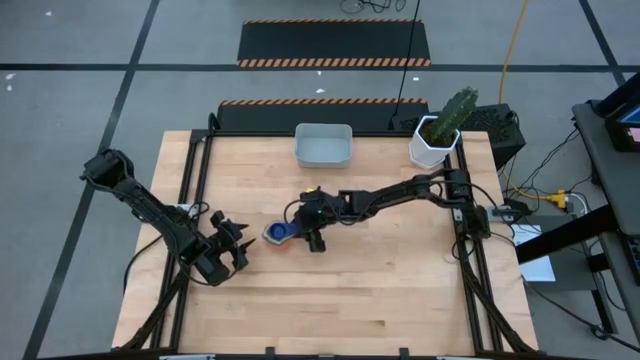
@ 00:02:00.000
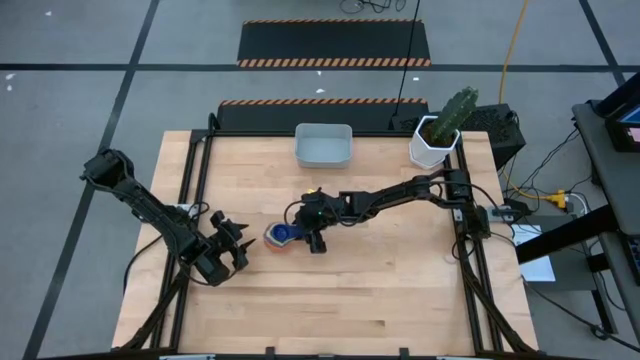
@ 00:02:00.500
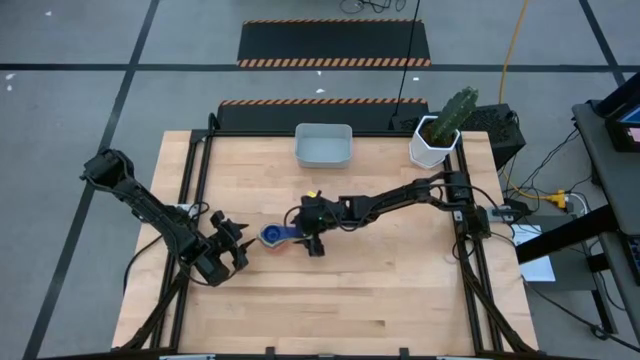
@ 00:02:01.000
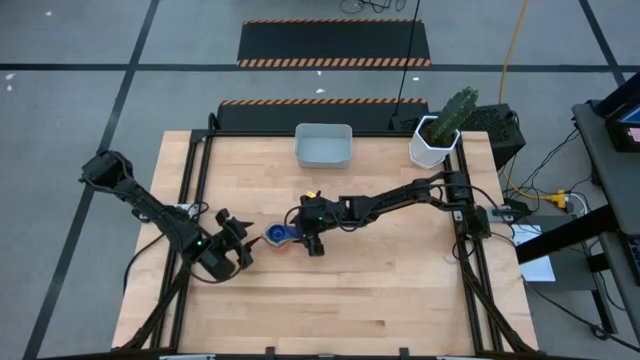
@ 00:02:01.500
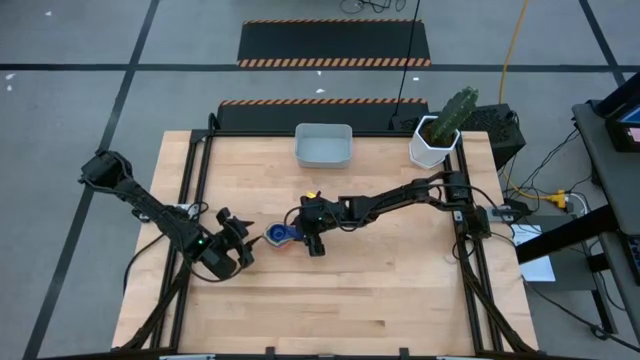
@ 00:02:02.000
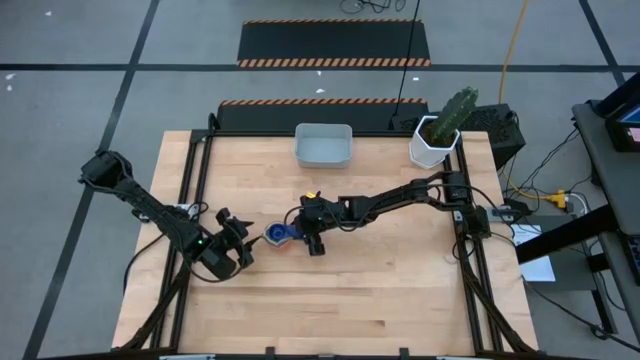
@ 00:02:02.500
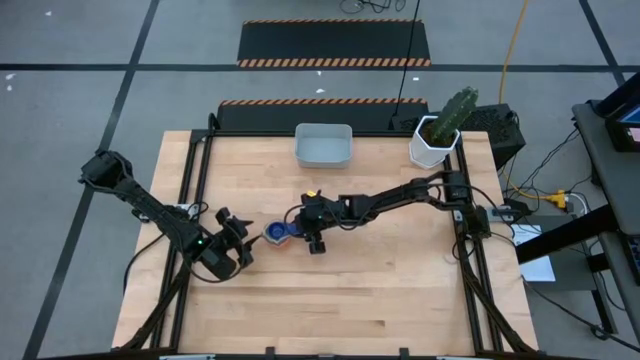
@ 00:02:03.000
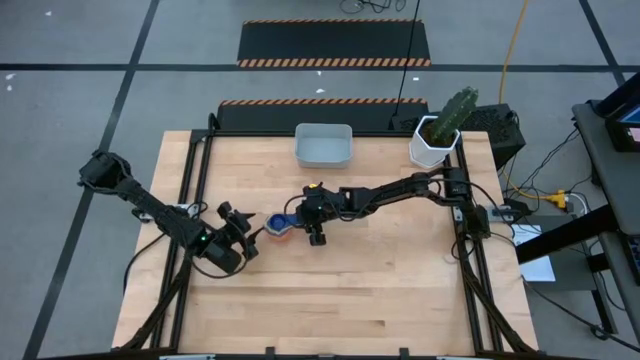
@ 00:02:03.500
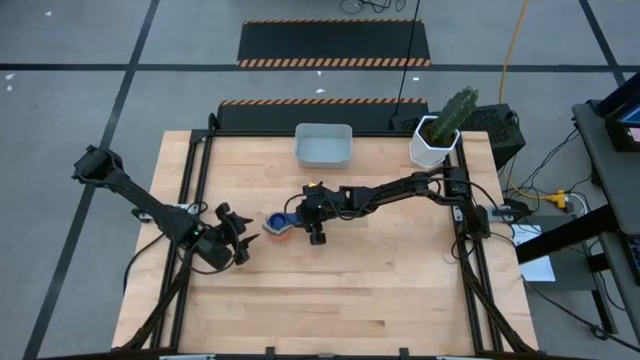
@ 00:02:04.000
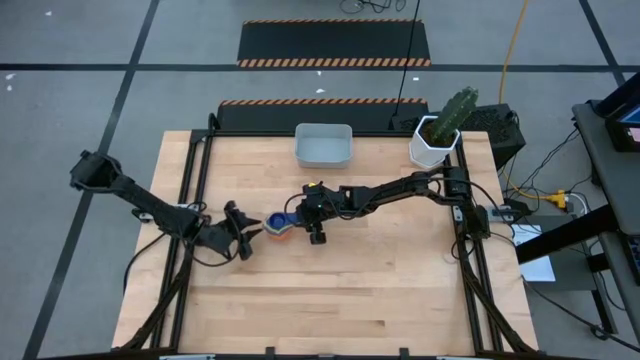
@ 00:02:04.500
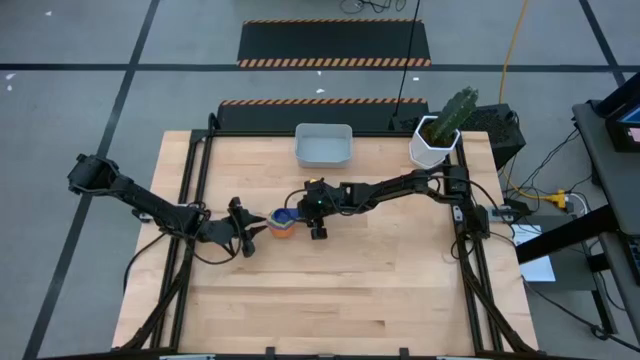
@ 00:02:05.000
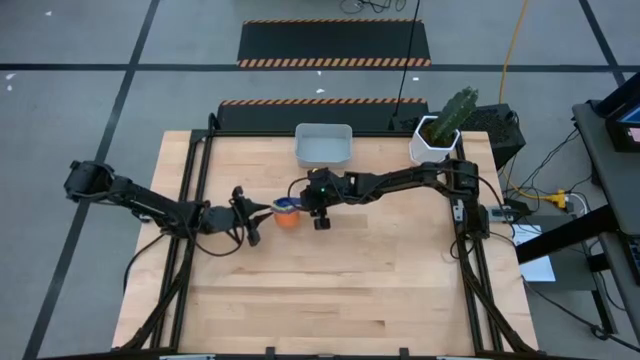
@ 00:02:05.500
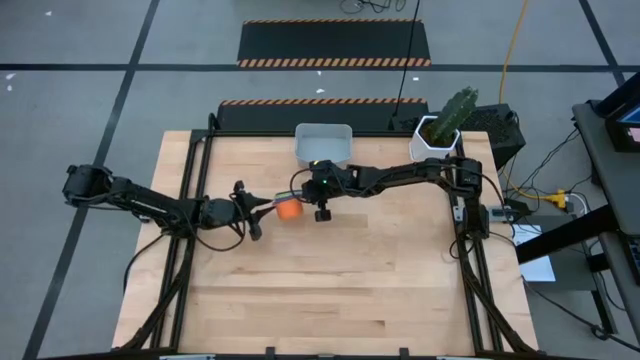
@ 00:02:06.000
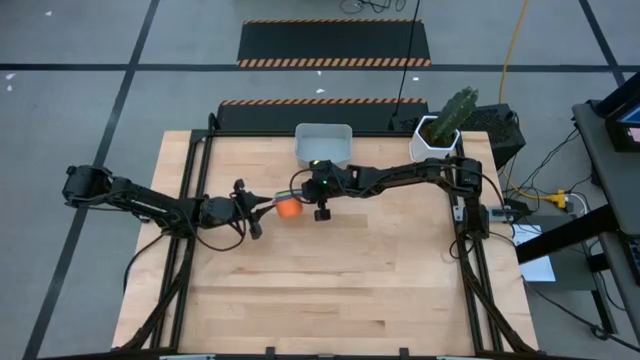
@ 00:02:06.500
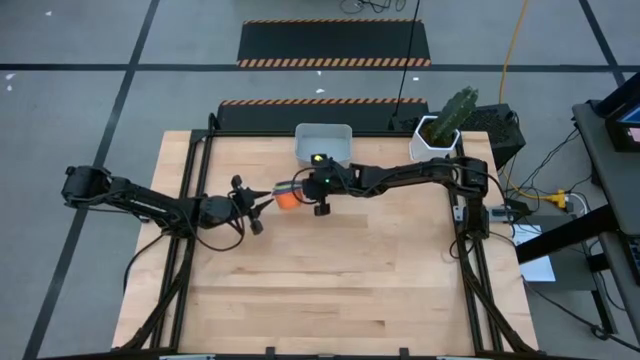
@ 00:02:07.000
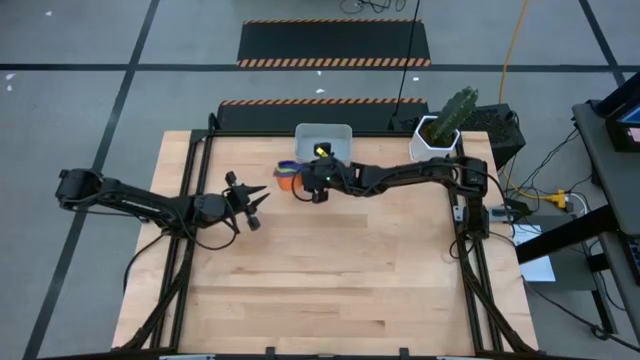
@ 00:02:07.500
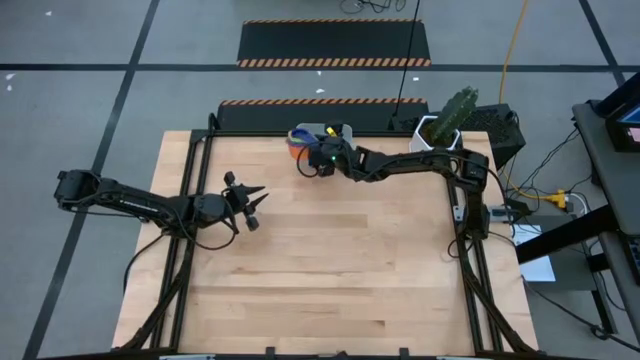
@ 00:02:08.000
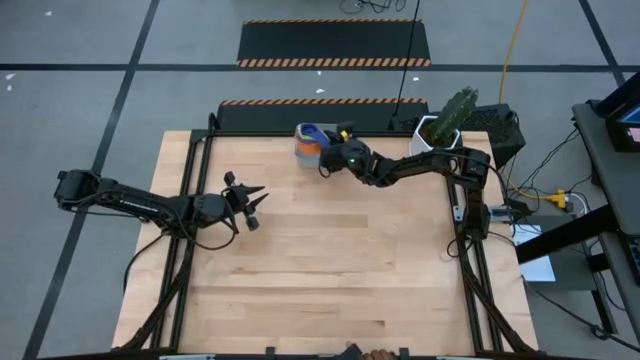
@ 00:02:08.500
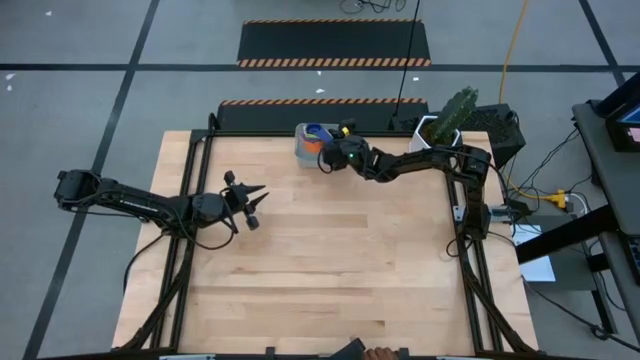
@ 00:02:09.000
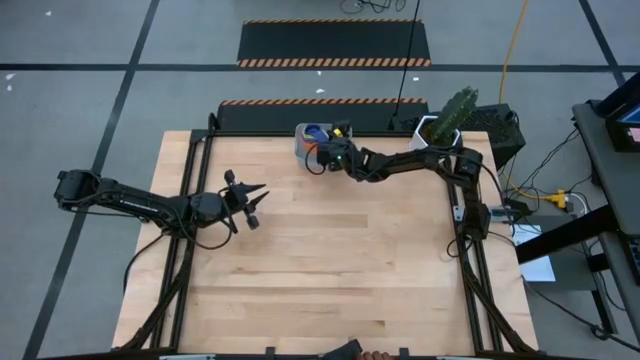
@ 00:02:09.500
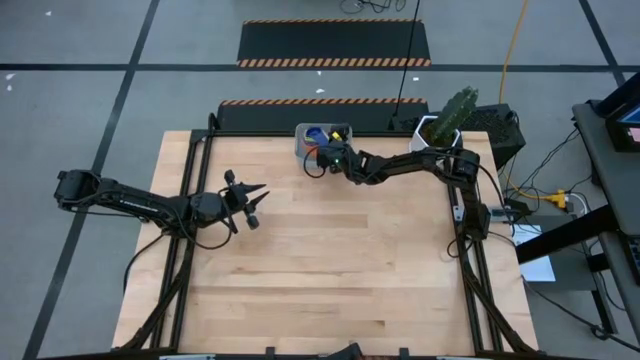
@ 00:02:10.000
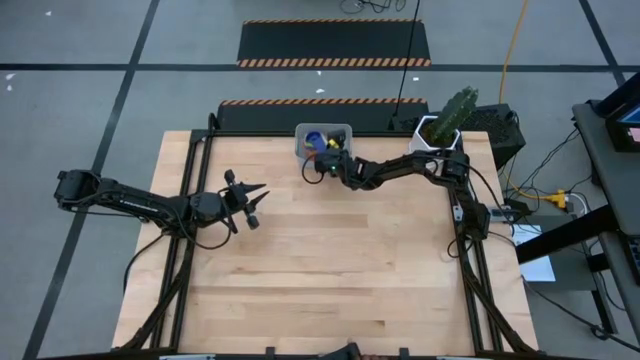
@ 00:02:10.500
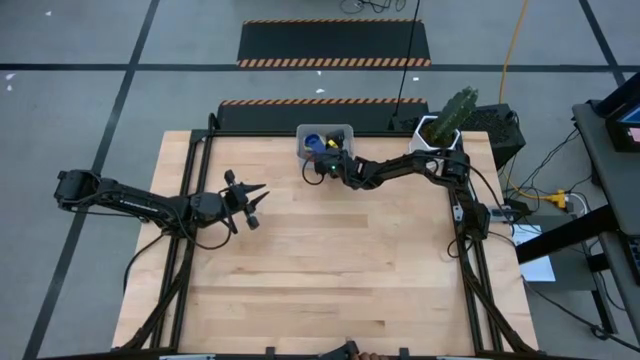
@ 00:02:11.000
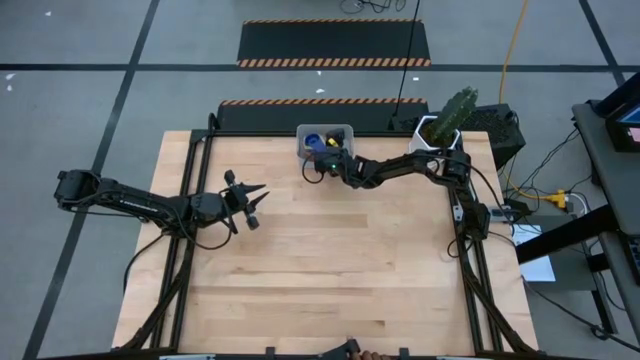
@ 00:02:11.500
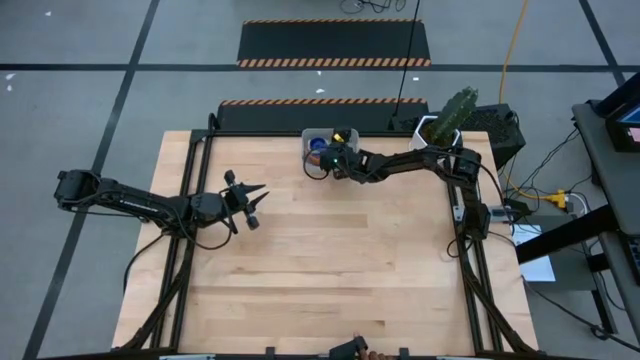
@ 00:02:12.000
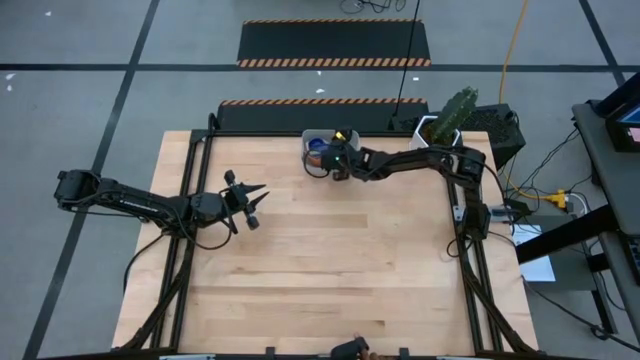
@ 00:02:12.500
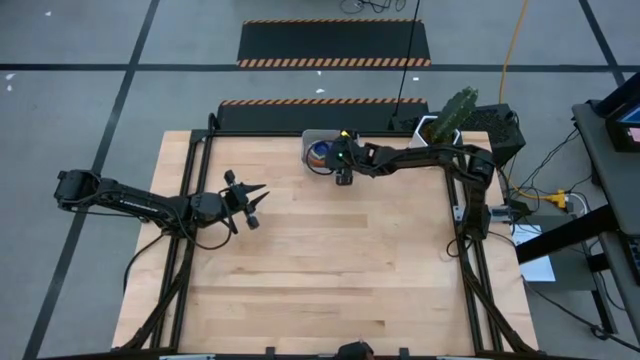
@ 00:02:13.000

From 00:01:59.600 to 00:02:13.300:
Task: Nest measuring cups in basket
Put the nested measuring cups into the gray bin

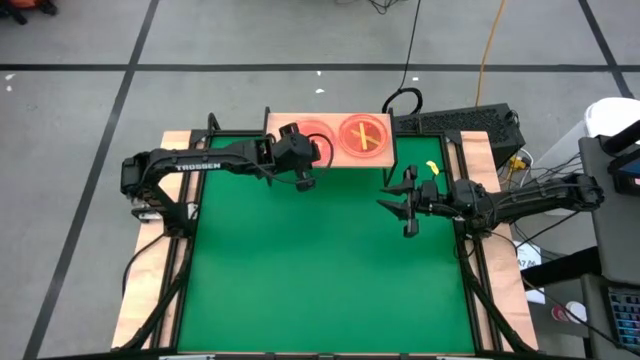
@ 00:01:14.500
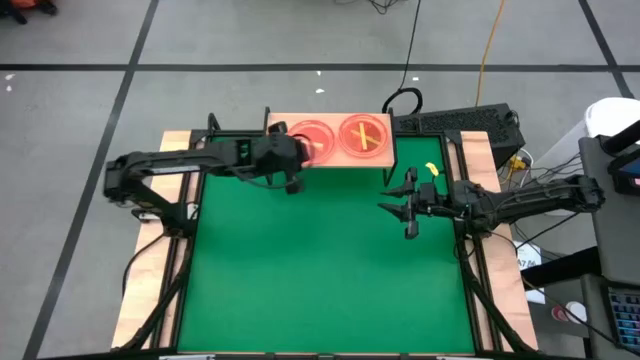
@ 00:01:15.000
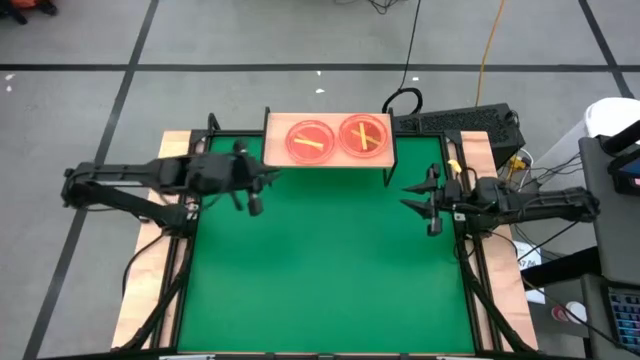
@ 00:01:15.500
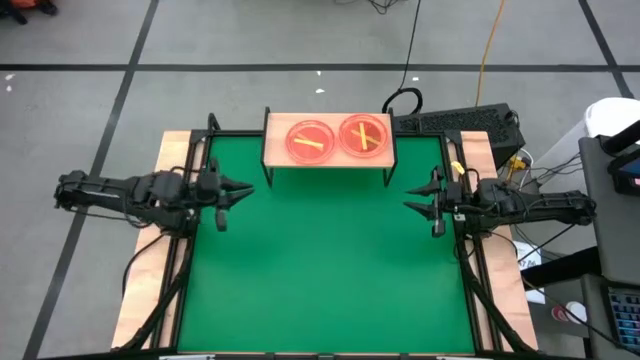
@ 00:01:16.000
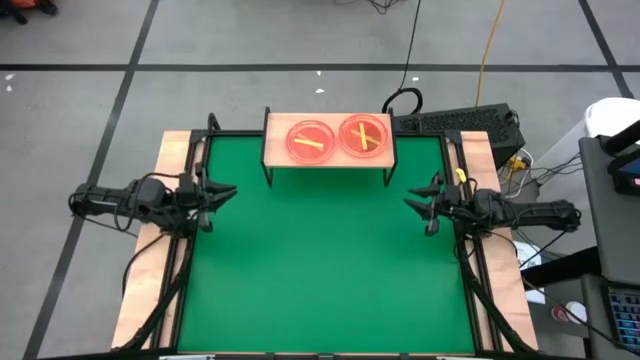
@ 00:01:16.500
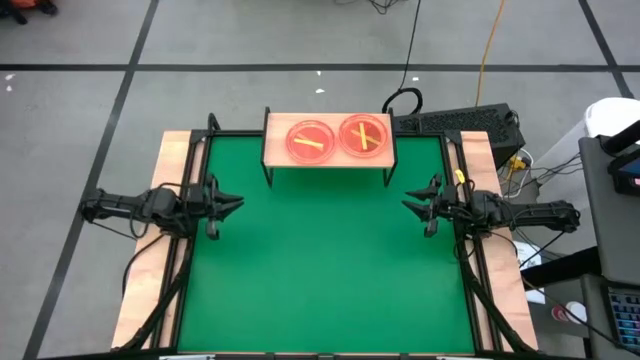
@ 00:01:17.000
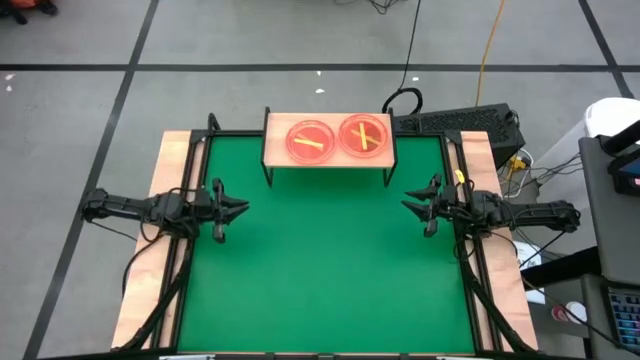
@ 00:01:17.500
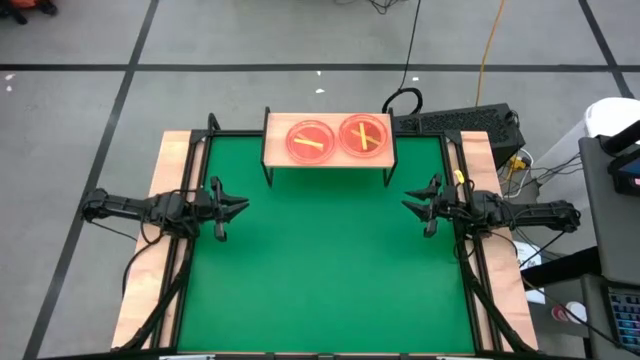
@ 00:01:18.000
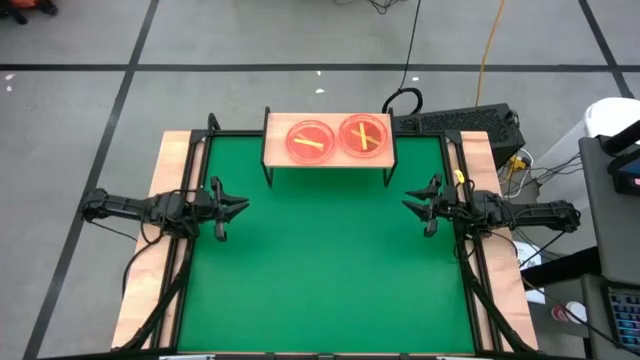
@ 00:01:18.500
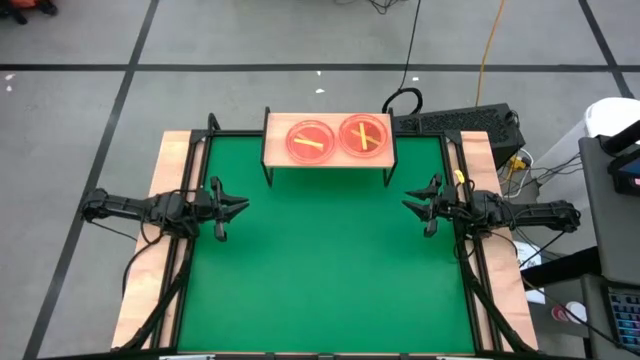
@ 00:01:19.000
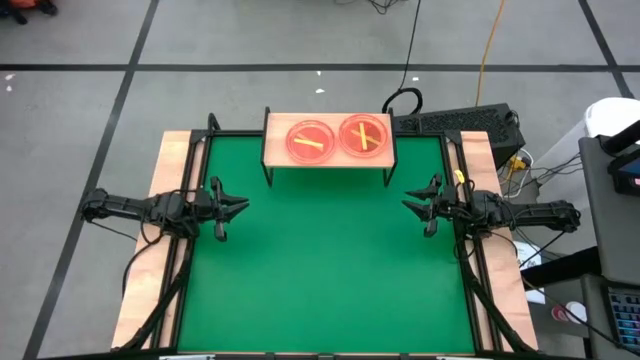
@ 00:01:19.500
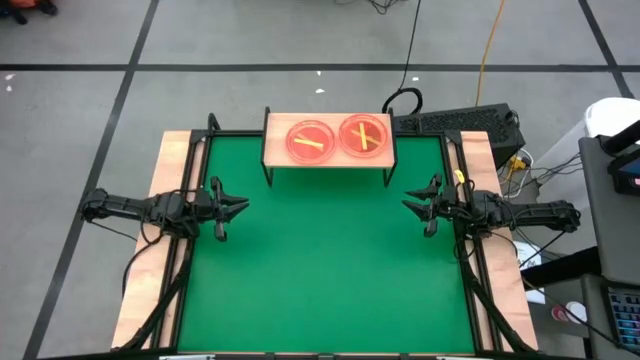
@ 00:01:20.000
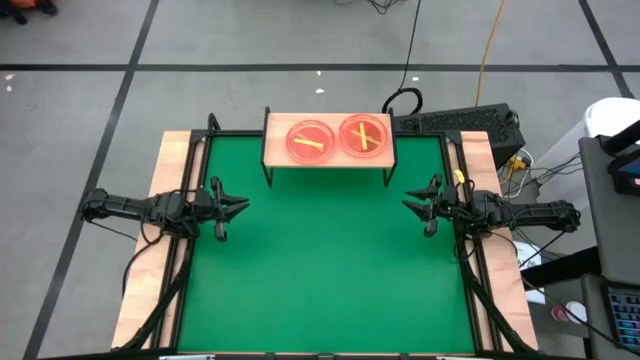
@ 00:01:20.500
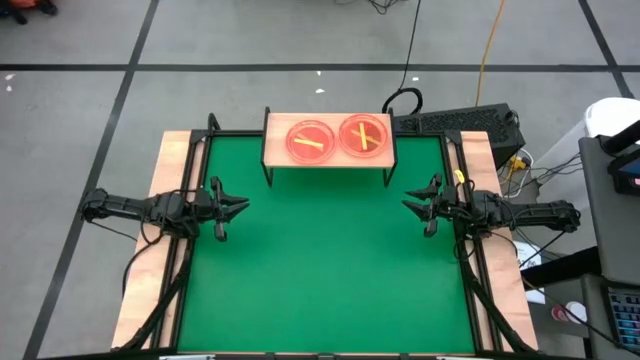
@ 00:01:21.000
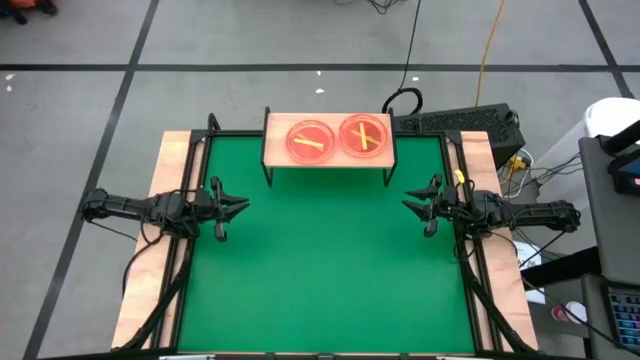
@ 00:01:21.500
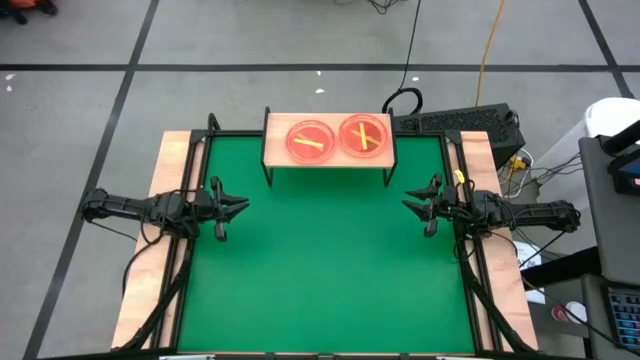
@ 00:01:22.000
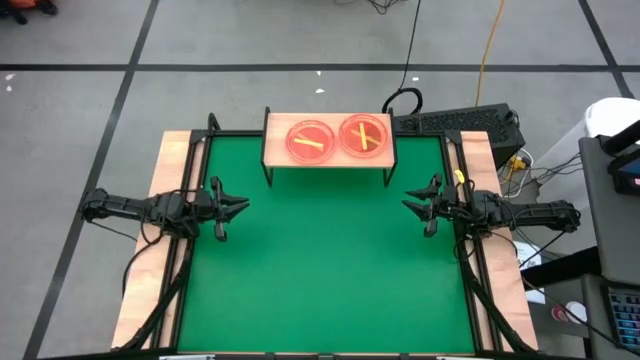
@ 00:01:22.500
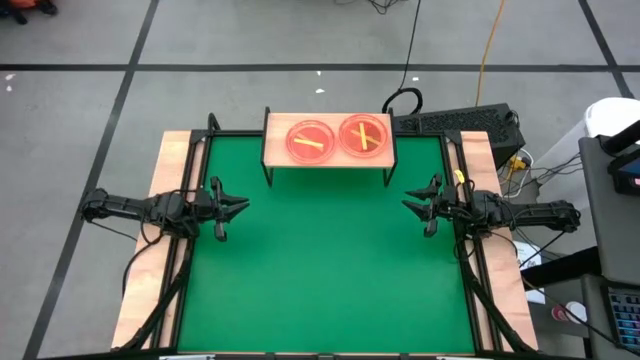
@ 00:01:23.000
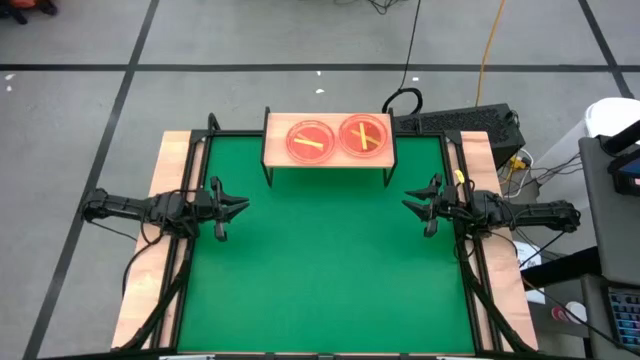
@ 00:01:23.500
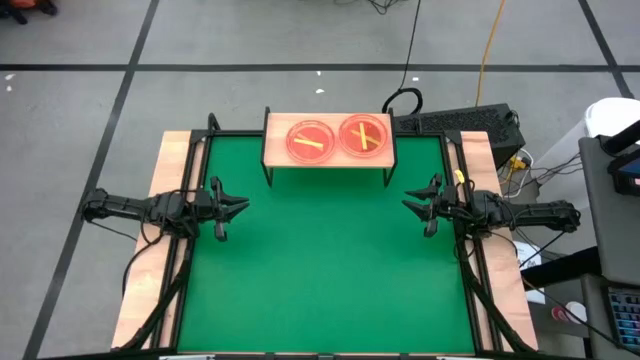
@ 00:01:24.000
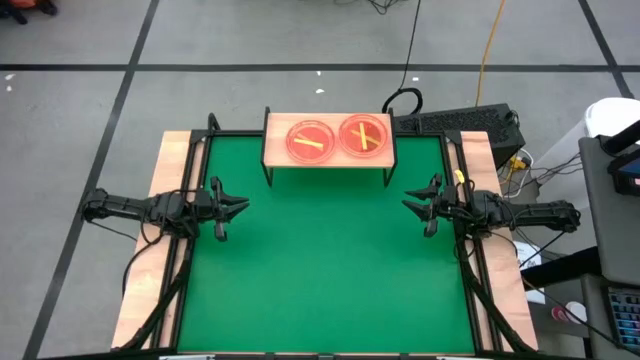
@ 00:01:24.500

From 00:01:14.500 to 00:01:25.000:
Task: Place and stack plates onto a shelf
Return to Home Position
